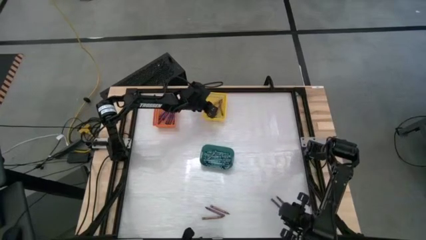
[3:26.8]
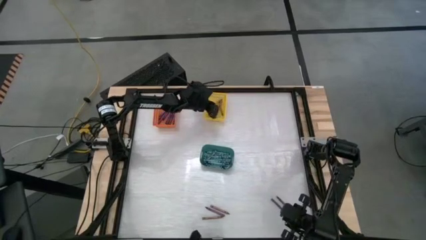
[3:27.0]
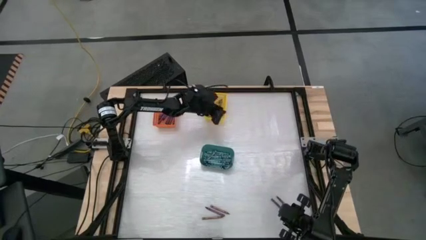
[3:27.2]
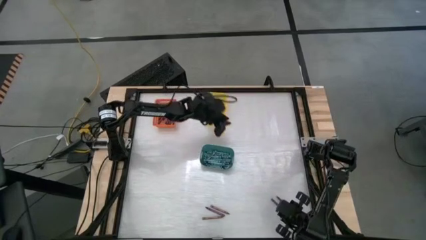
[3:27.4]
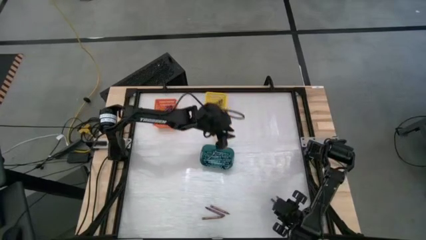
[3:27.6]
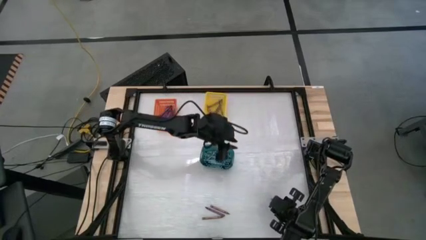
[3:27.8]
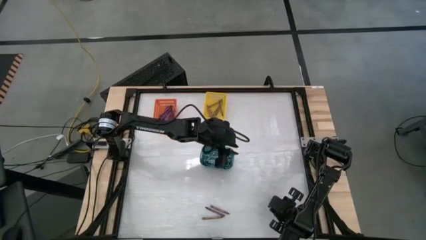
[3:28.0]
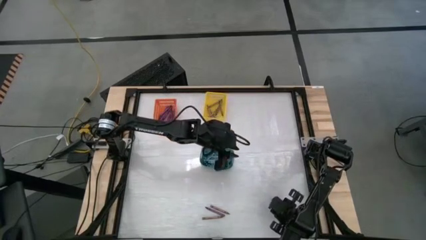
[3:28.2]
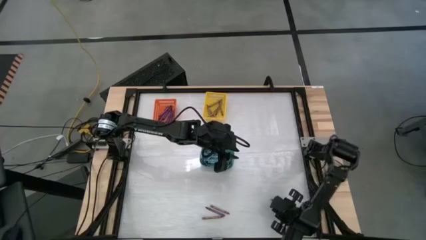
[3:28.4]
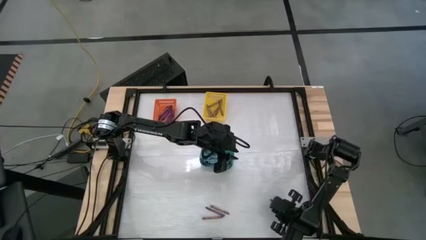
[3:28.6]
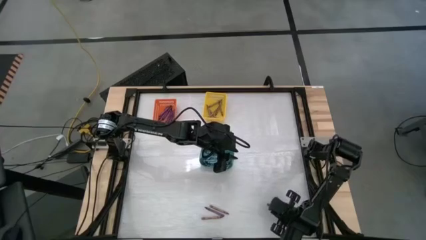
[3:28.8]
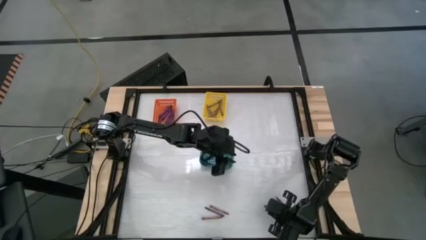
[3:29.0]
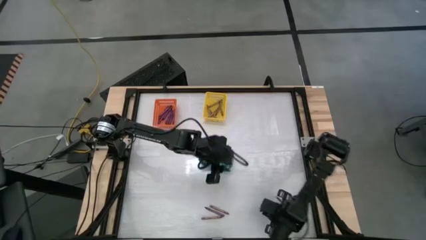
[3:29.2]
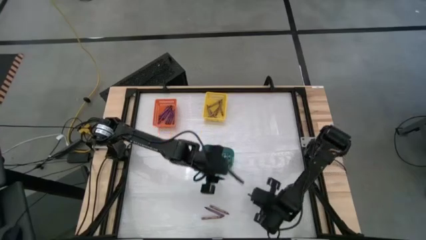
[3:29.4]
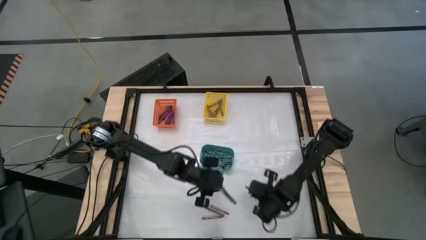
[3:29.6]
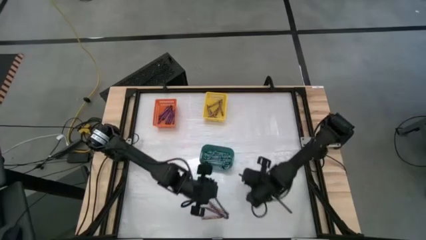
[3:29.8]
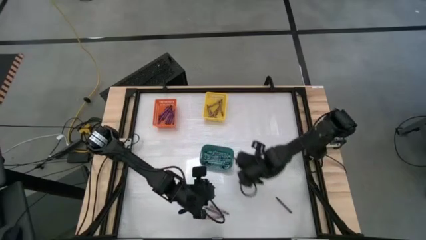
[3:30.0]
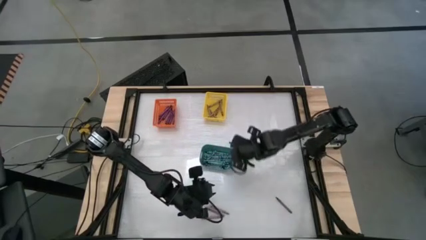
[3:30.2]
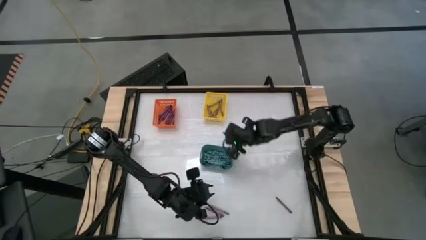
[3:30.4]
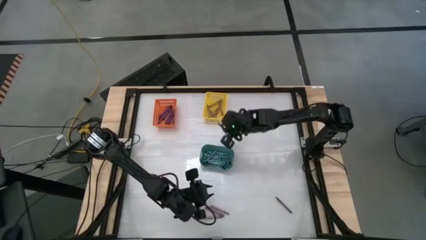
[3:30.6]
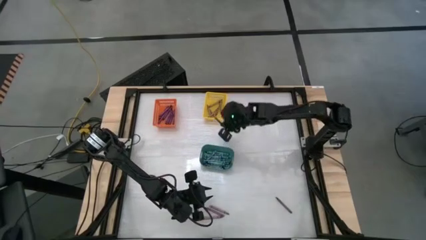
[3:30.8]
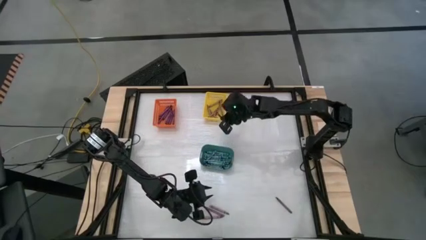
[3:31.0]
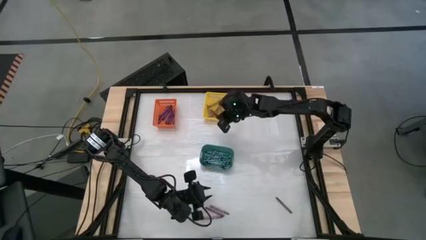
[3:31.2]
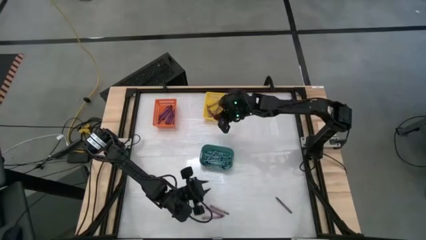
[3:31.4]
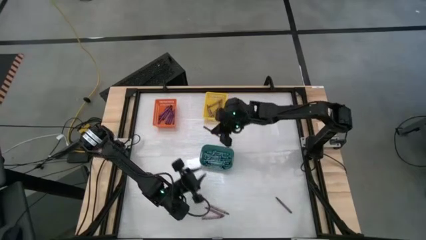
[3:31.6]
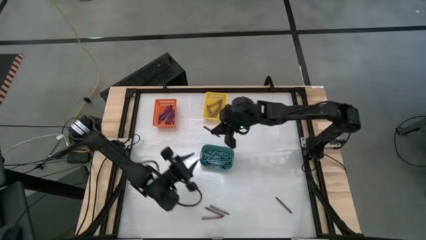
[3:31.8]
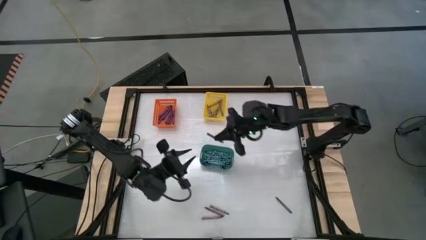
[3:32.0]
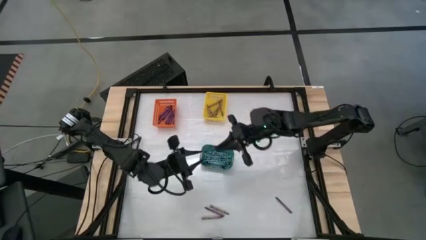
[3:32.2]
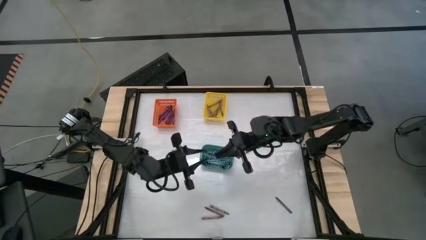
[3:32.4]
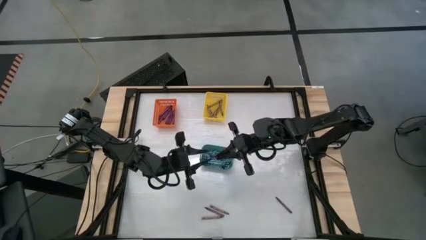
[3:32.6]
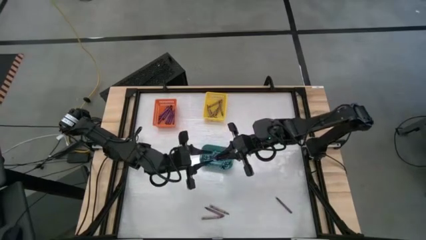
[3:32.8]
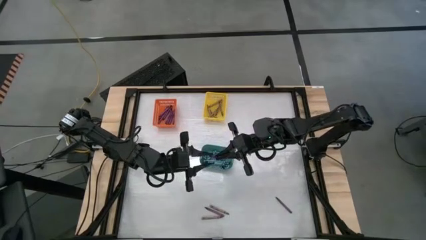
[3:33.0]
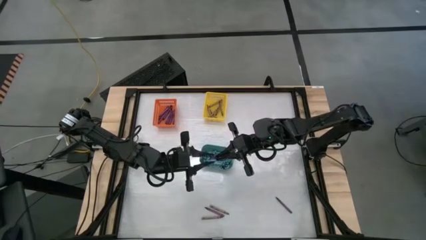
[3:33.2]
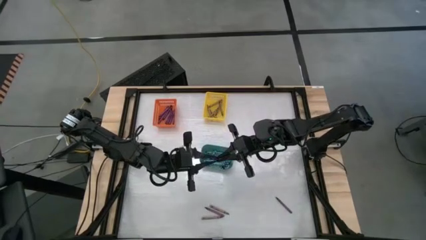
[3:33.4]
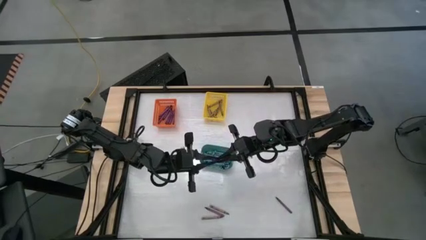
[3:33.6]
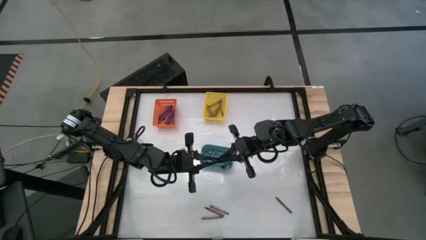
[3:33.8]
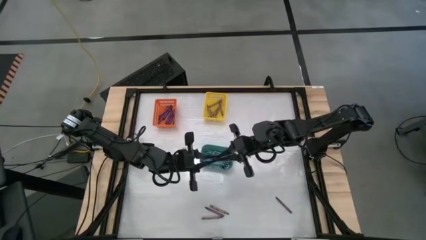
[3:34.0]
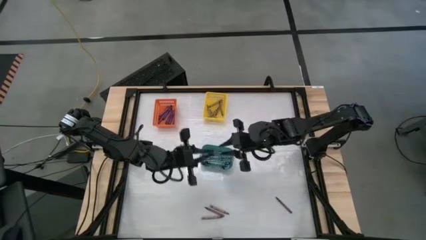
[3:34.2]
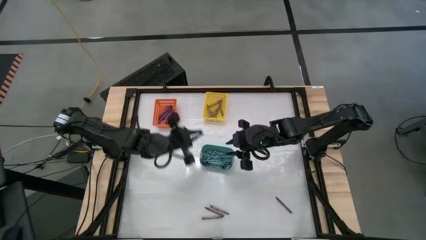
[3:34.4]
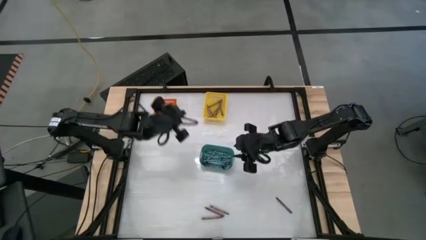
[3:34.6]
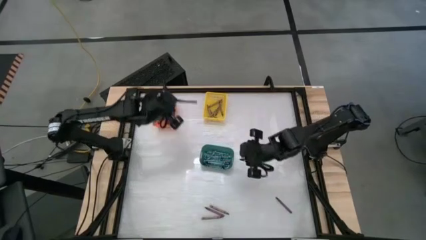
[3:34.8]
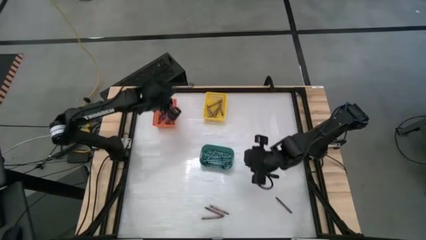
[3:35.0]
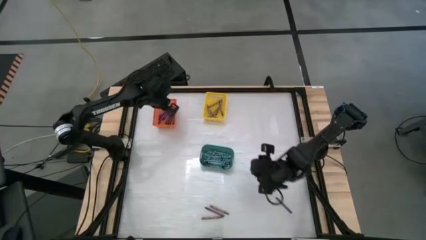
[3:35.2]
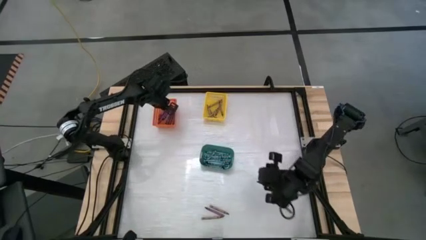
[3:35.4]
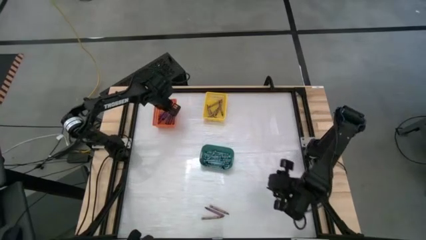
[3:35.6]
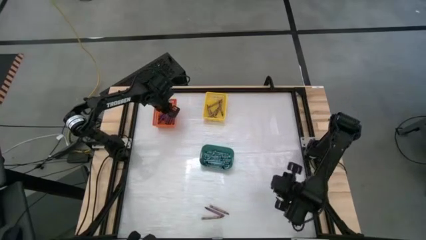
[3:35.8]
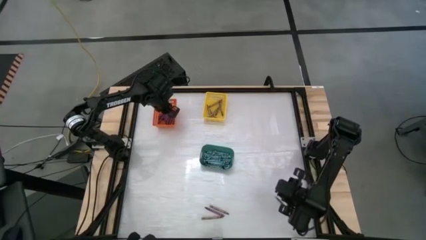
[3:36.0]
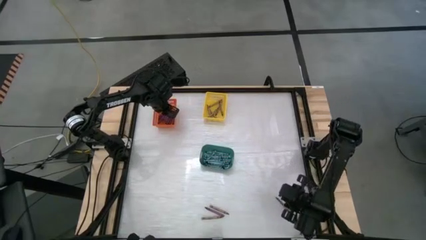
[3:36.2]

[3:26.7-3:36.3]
Task: Sort crayons
Put the violet crayon into the orange bin

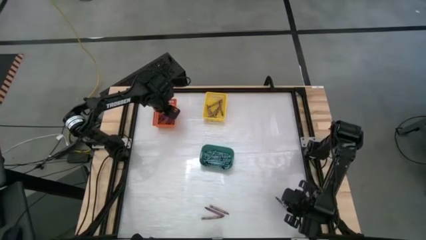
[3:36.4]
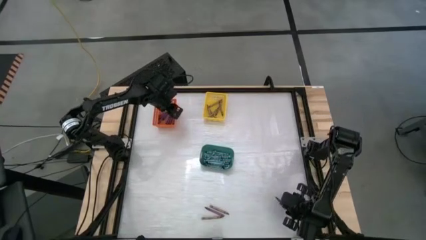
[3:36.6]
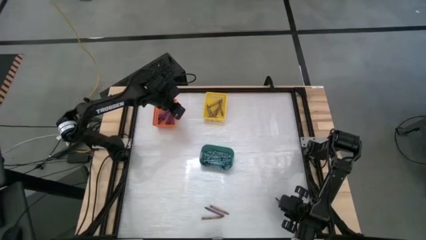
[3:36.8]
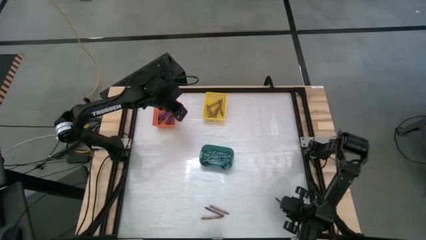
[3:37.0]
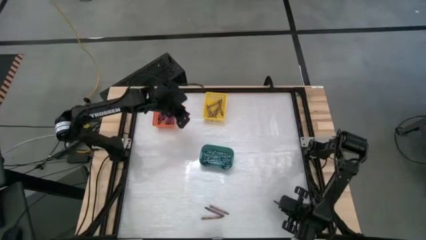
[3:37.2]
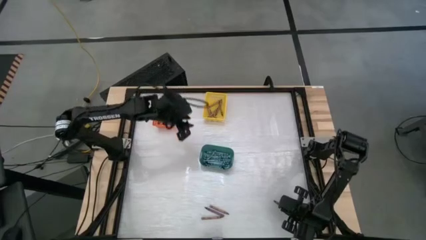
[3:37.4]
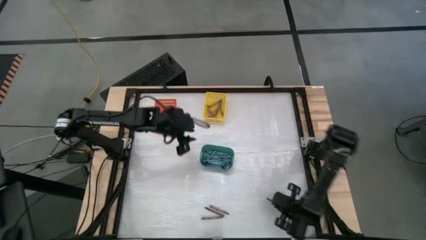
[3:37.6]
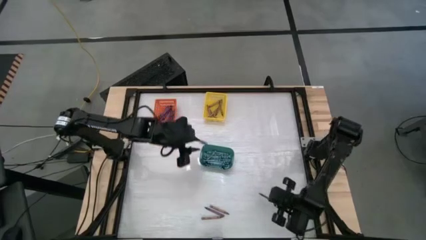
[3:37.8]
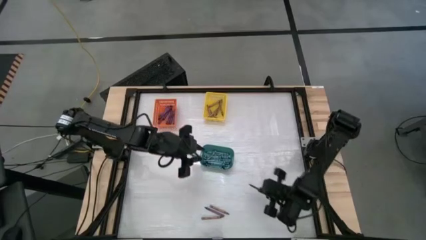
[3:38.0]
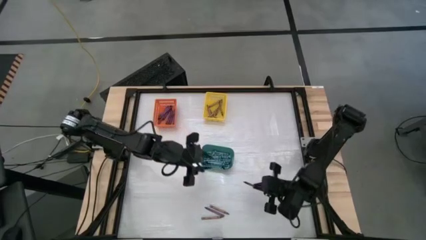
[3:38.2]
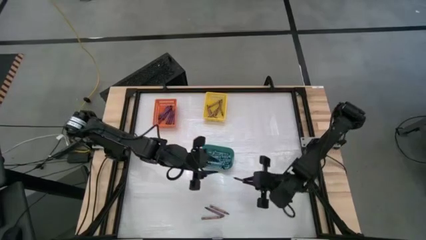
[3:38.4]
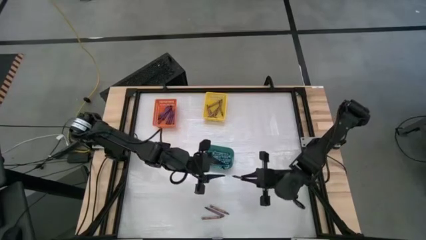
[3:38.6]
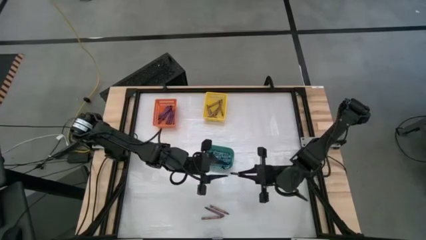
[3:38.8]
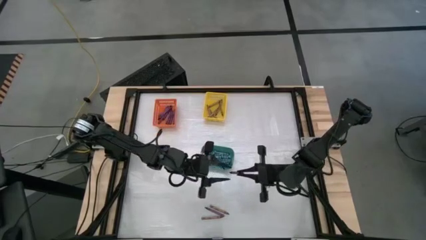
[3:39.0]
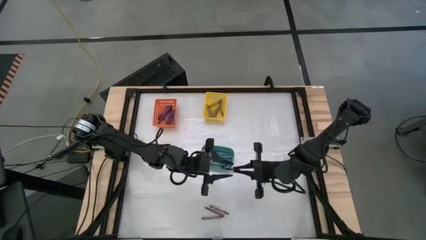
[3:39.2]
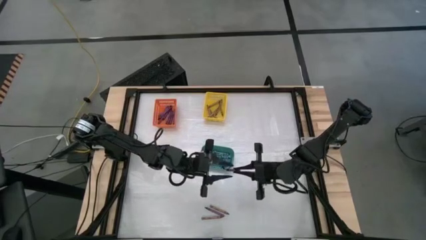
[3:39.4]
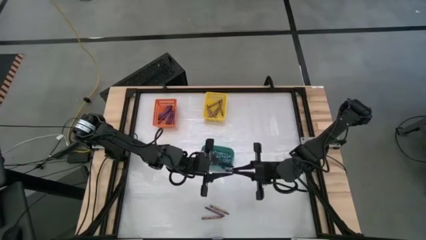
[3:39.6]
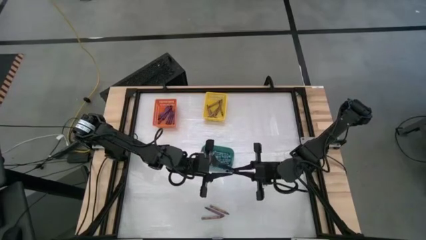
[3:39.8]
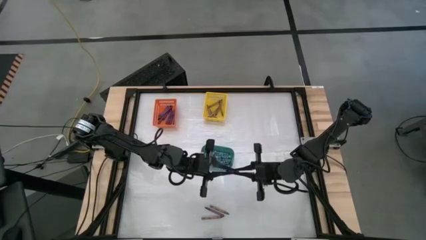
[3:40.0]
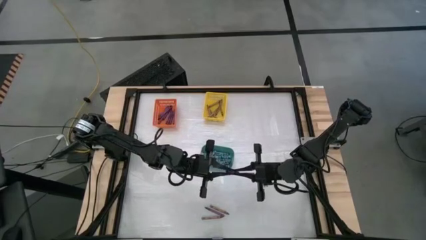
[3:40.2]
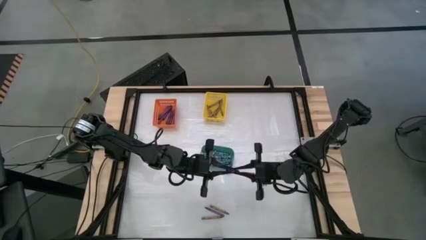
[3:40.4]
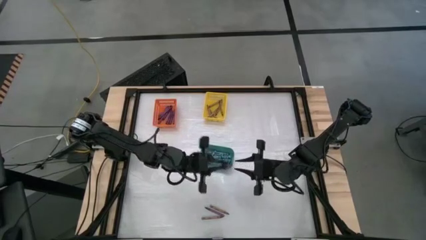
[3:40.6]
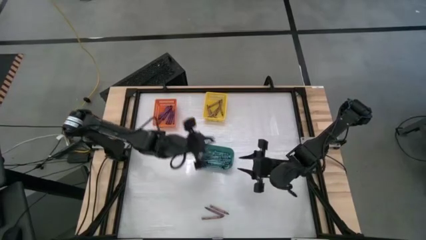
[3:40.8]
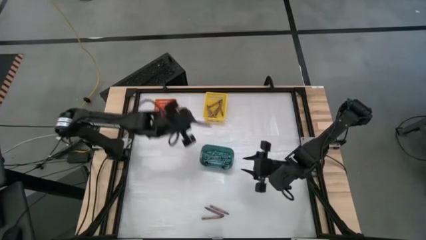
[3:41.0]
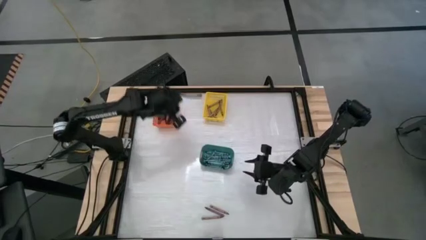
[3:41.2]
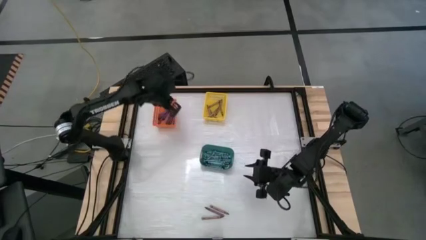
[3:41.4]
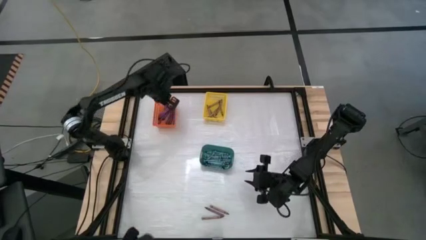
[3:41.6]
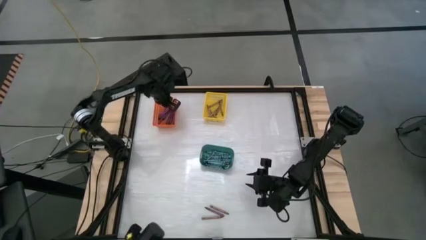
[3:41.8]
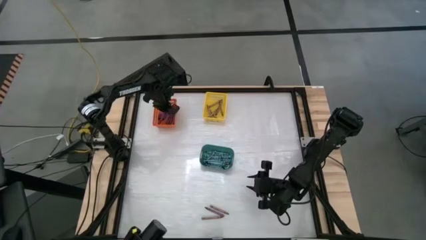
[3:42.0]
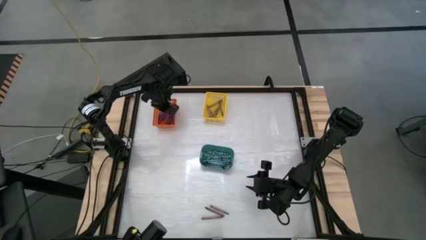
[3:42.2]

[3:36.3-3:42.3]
Put the violet crayon into the orange bin

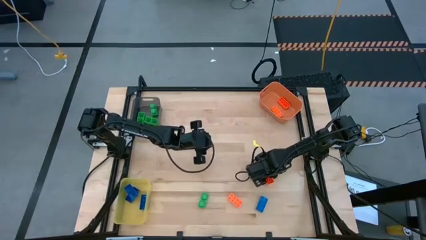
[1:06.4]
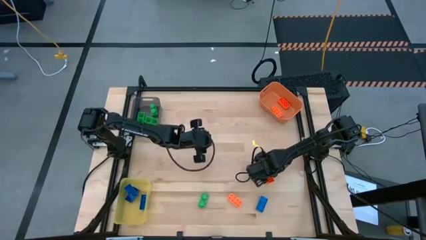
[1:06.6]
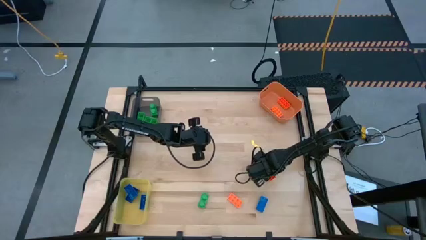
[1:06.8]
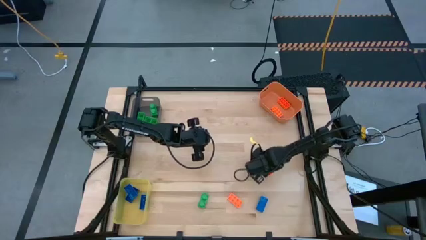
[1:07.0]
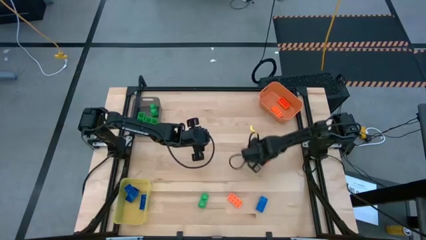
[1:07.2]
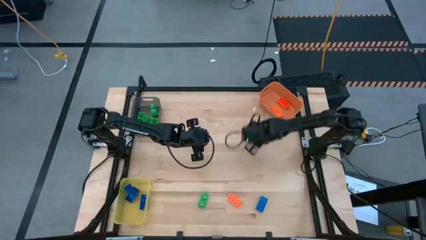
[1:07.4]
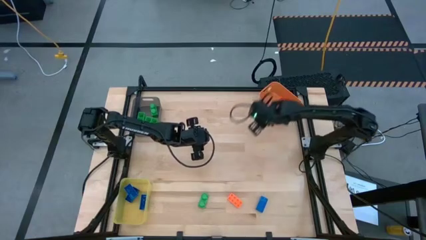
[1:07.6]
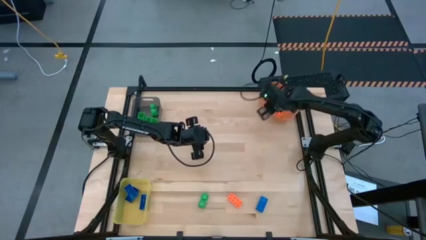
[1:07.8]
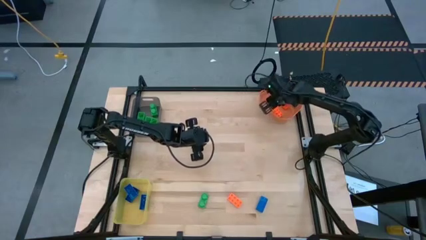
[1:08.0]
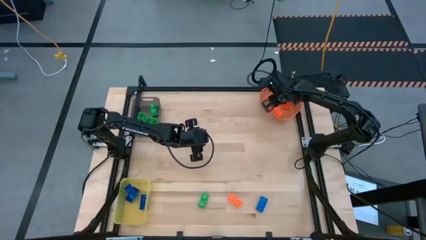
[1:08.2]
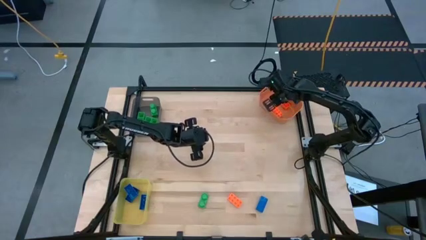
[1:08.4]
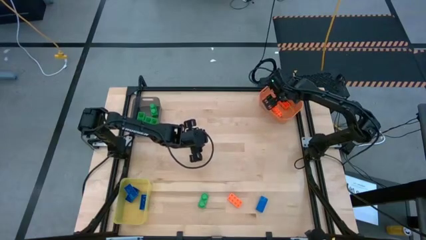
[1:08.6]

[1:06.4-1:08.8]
Task: Sort & place blocks by color
Put the orange game piece into the orange bin
